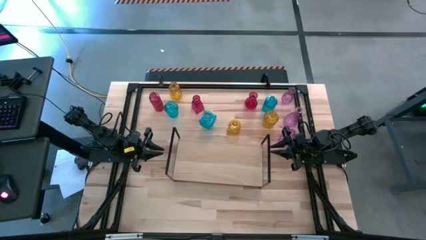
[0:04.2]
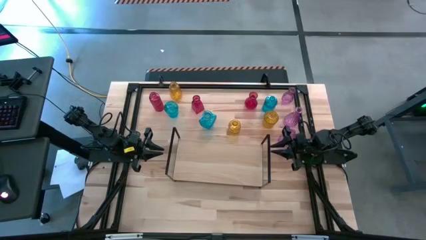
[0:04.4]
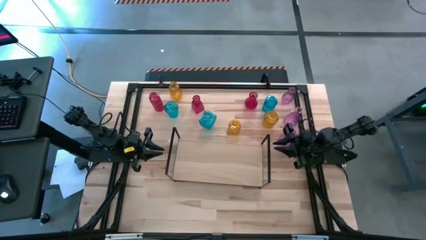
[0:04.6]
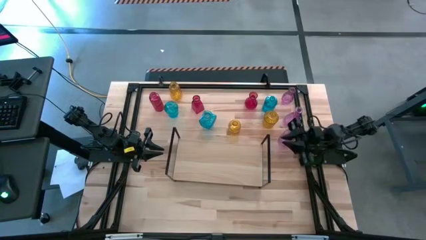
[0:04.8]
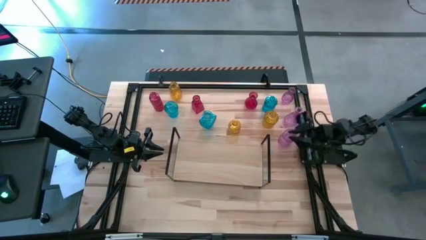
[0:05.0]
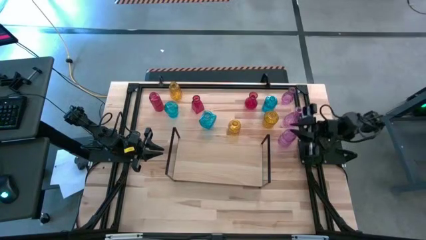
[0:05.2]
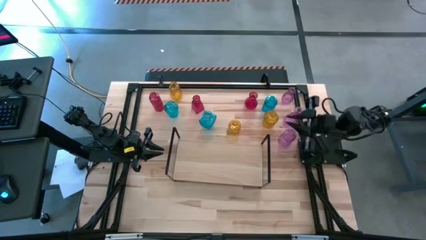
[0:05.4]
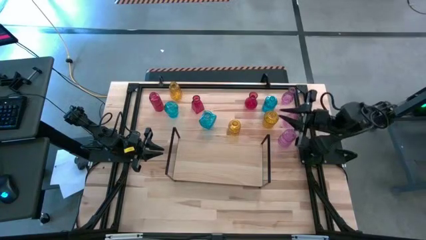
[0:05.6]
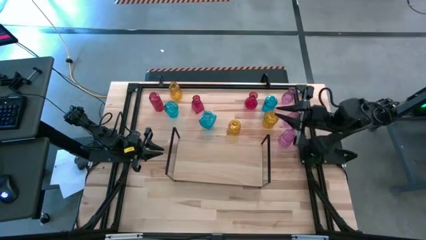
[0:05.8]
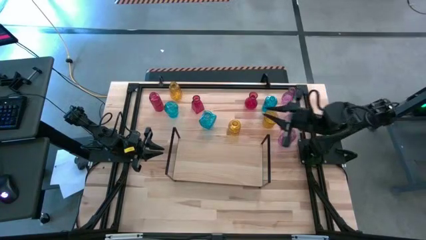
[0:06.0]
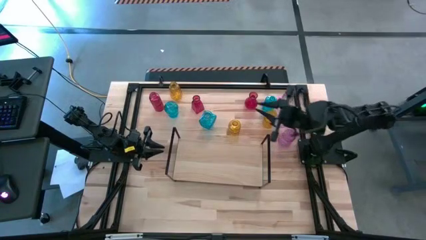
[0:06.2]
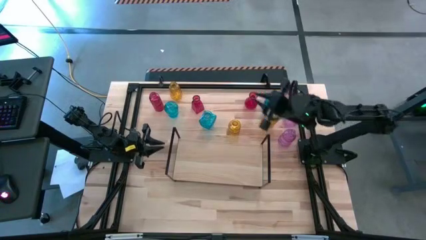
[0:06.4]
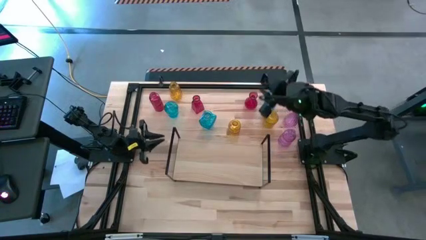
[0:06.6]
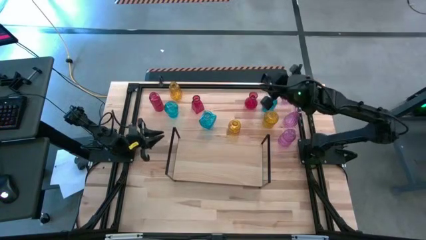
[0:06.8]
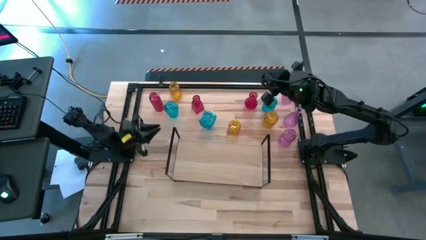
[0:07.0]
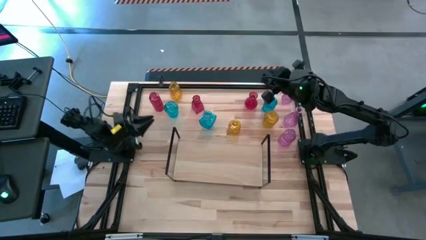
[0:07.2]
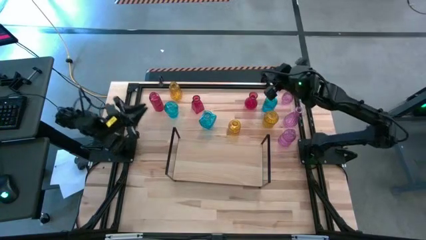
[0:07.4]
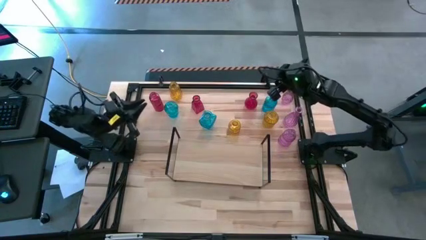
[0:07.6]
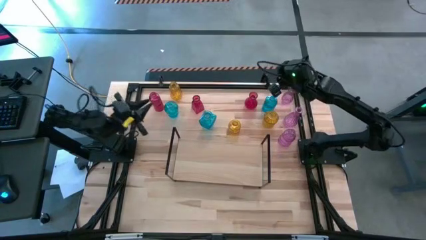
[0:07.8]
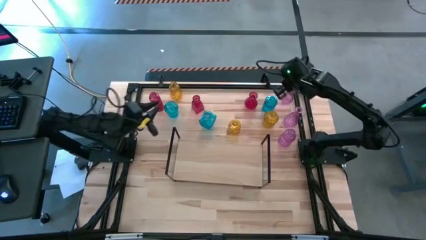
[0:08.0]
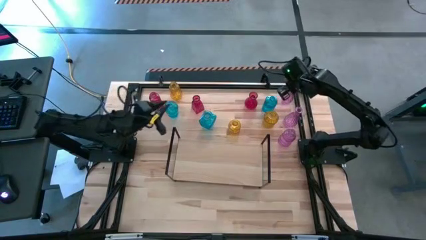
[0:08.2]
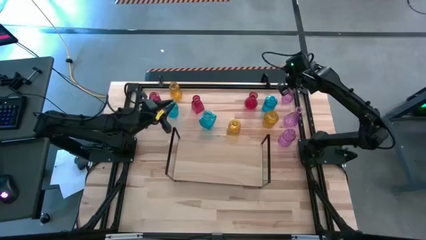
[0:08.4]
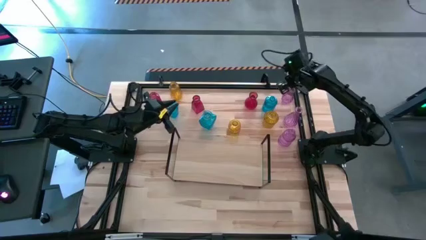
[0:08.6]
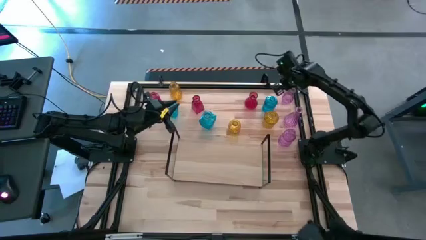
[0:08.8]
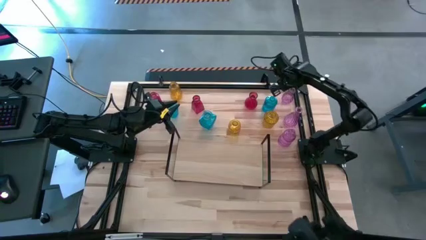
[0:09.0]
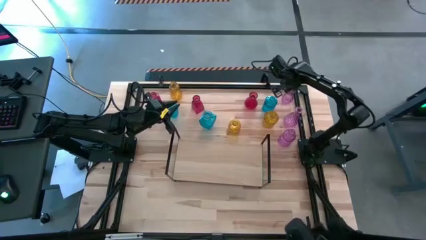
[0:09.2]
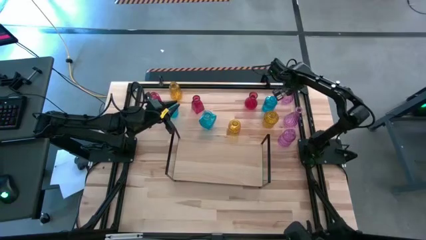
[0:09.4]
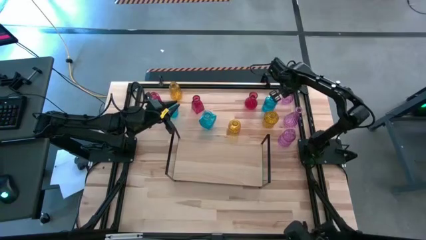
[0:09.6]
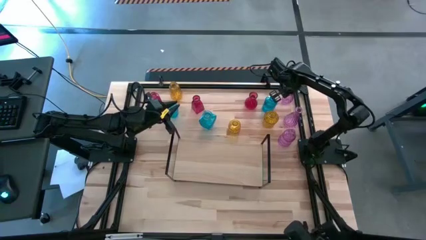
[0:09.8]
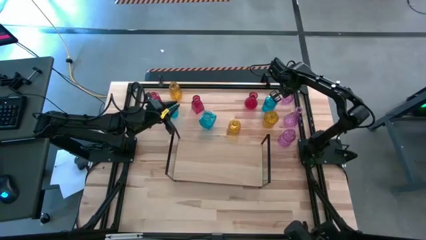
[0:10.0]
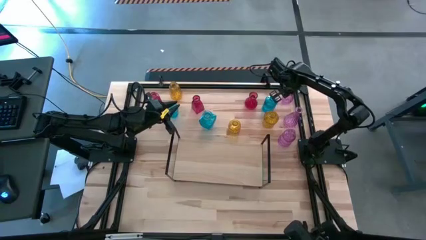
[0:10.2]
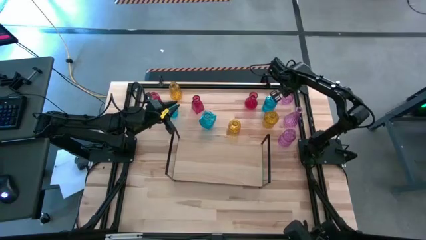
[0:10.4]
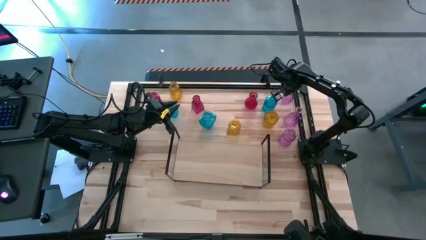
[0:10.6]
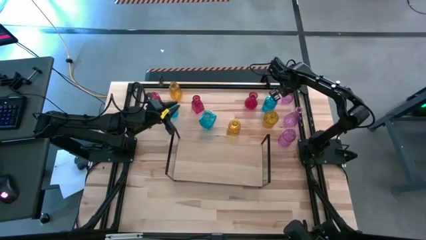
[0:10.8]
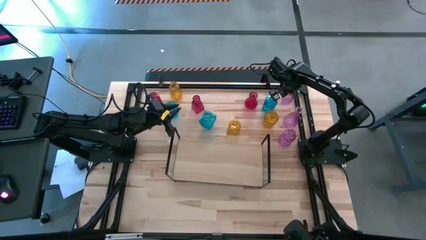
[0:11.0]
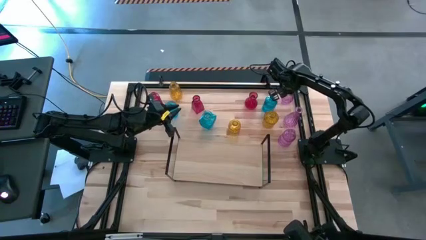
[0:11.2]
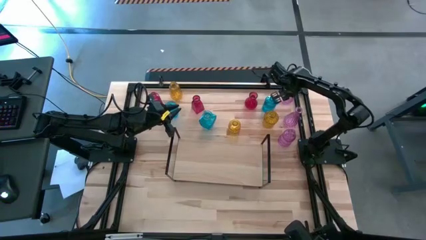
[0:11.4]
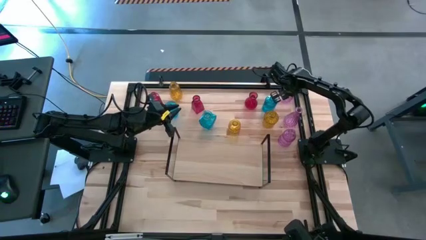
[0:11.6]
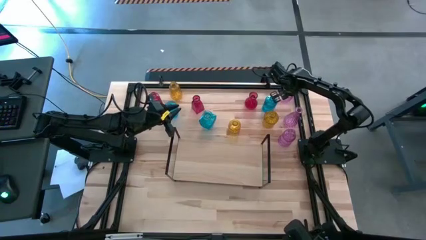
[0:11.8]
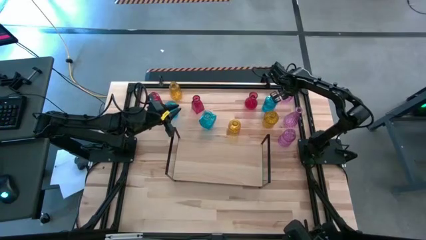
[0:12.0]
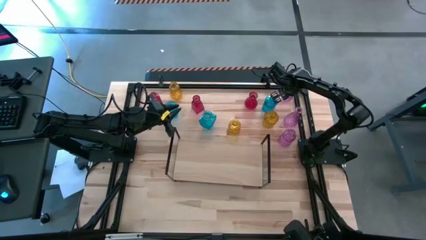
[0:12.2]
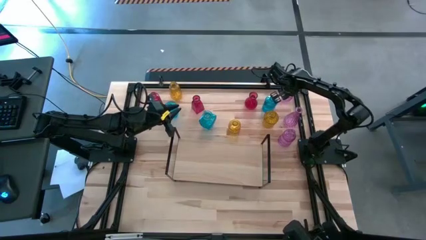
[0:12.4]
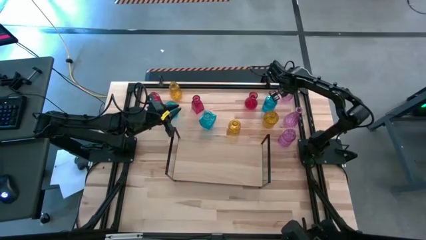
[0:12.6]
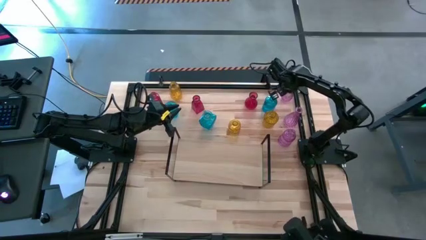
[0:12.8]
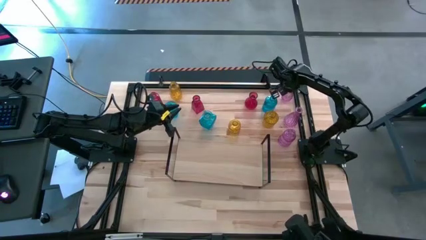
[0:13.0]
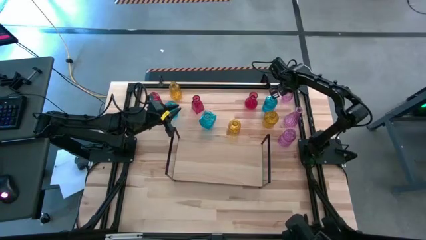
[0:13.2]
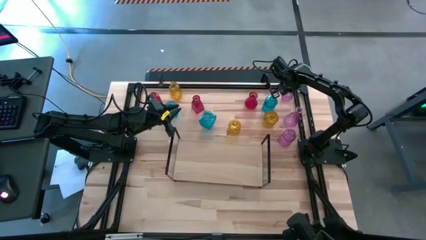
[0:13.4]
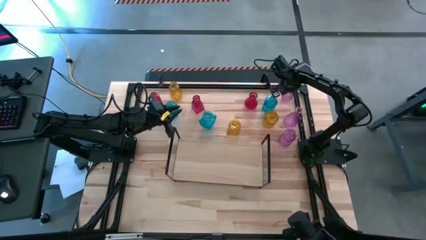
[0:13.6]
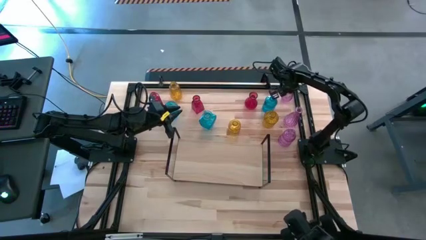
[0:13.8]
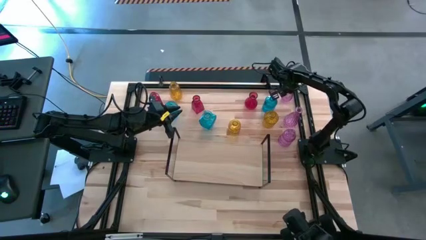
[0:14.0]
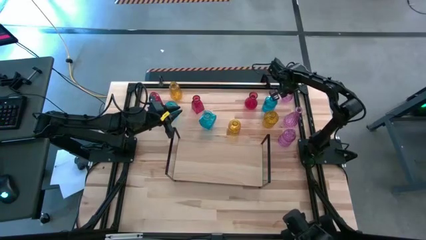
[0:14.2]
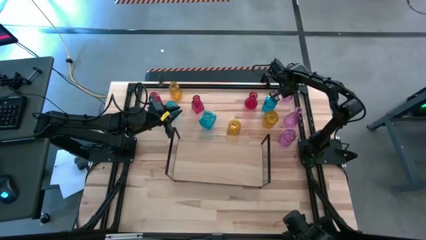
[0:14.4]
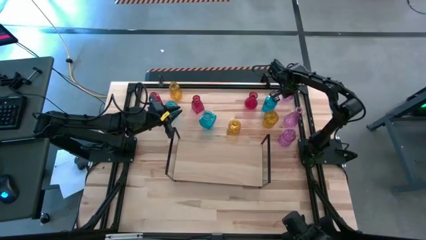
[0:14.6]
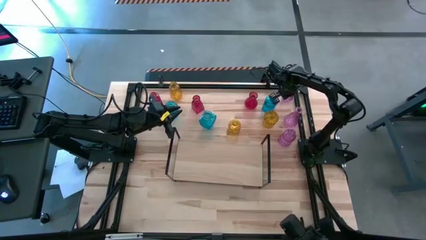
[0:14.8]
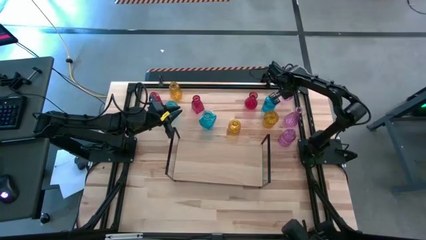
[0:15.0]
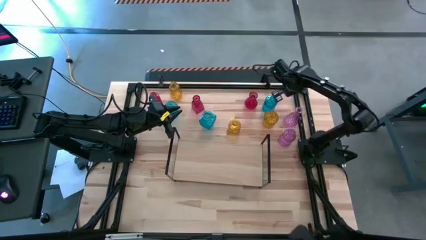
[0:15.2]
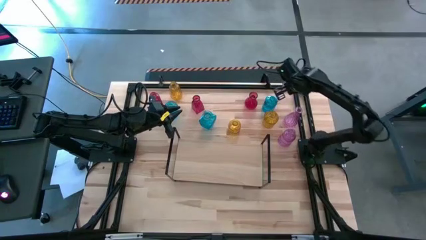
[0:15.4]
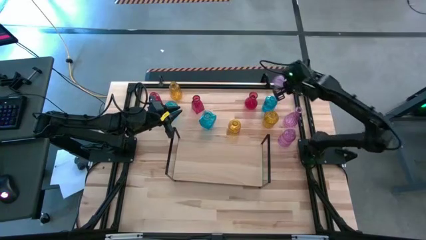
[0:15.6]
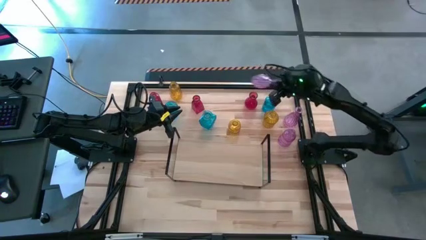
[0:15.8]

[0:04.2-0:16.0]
Task: sort vases onto shelf
Put the top violet vase on the shelf

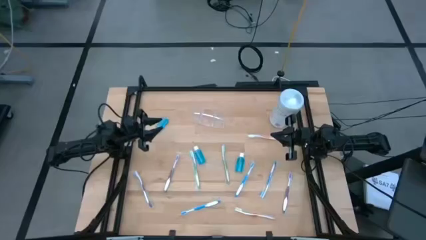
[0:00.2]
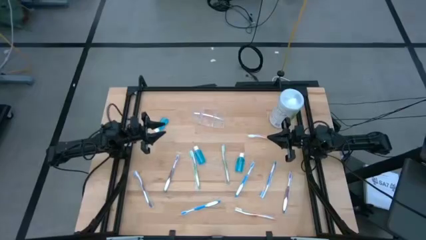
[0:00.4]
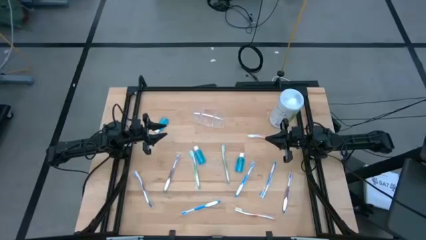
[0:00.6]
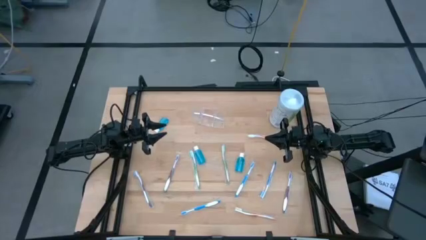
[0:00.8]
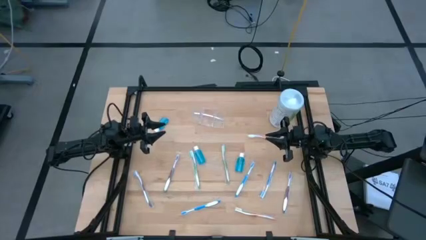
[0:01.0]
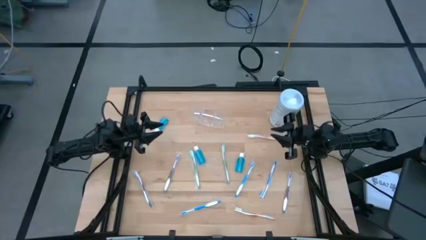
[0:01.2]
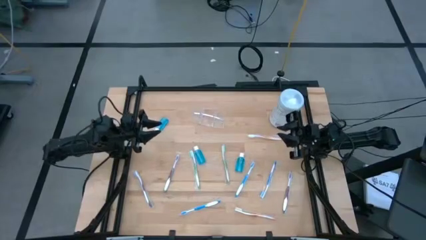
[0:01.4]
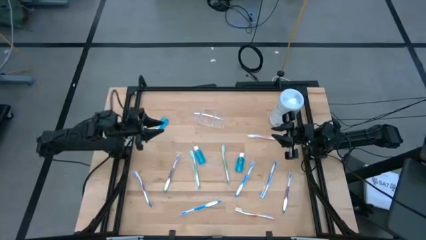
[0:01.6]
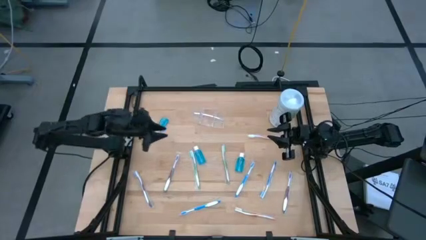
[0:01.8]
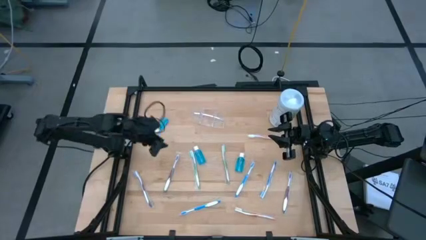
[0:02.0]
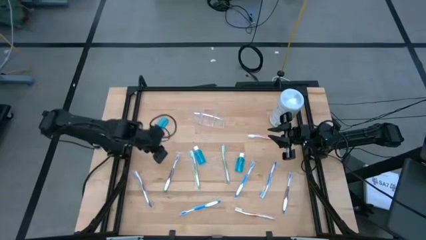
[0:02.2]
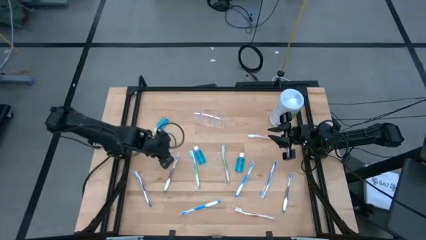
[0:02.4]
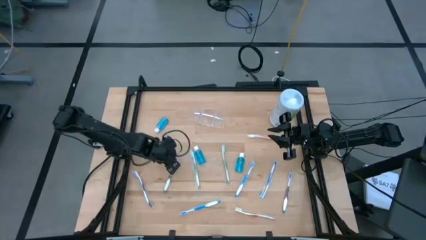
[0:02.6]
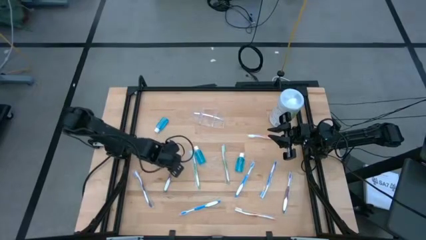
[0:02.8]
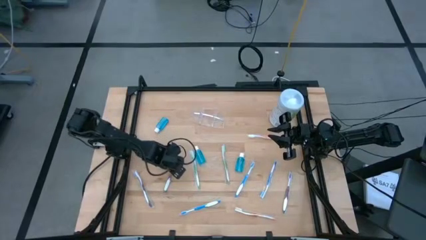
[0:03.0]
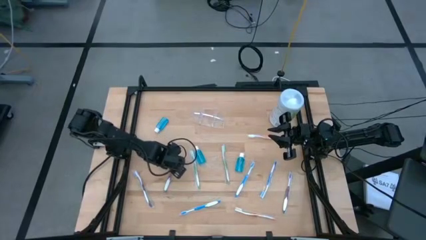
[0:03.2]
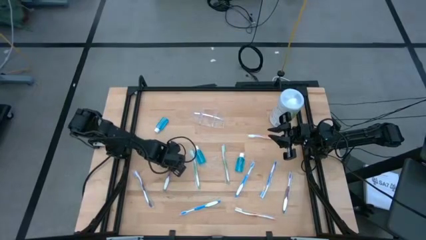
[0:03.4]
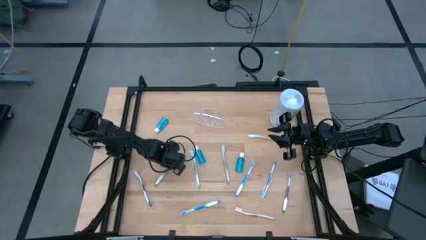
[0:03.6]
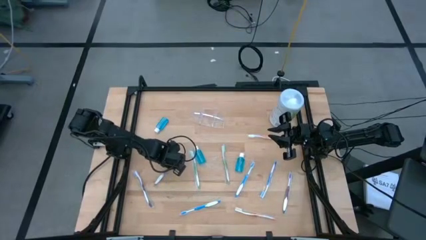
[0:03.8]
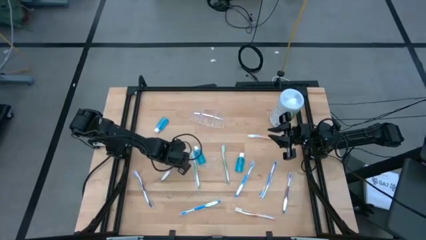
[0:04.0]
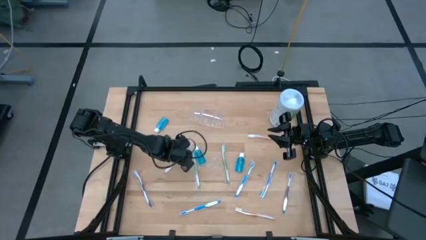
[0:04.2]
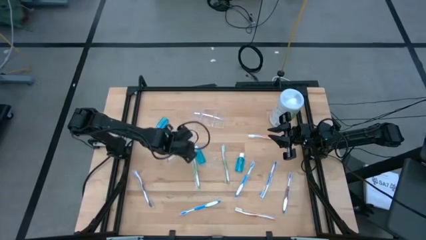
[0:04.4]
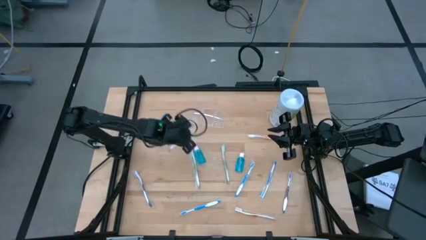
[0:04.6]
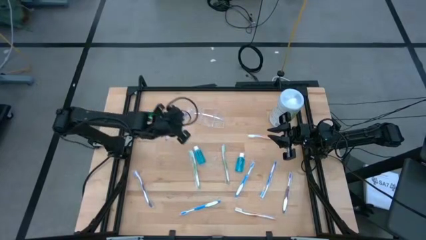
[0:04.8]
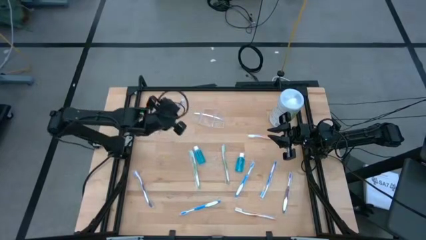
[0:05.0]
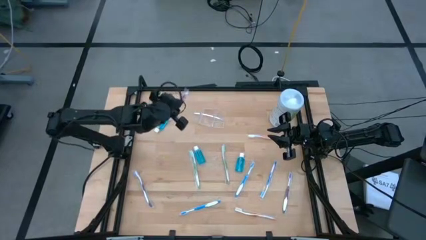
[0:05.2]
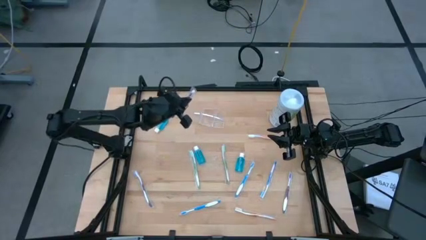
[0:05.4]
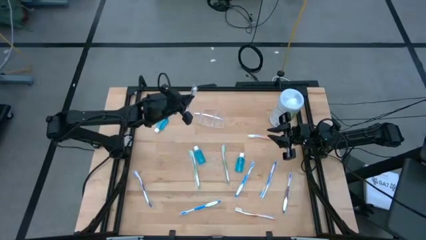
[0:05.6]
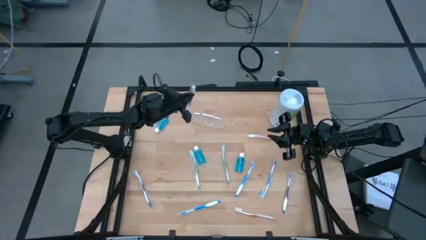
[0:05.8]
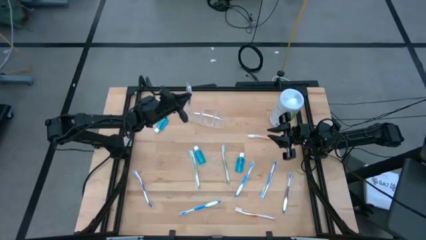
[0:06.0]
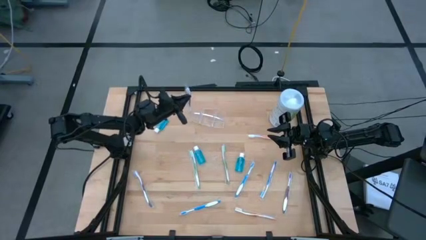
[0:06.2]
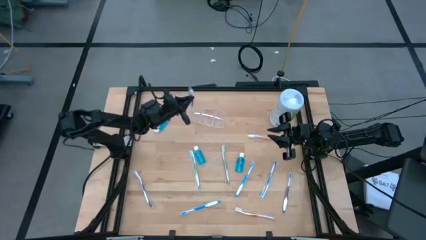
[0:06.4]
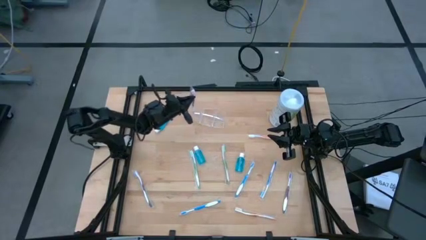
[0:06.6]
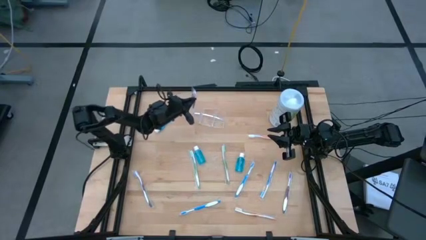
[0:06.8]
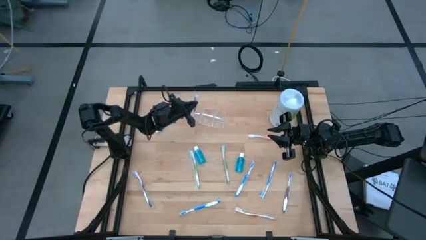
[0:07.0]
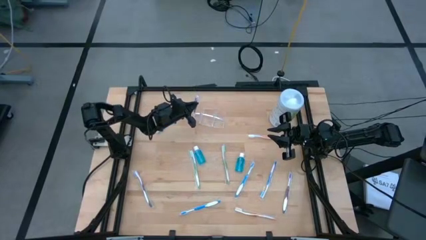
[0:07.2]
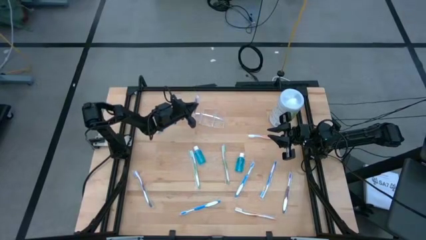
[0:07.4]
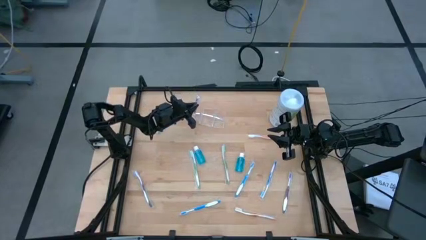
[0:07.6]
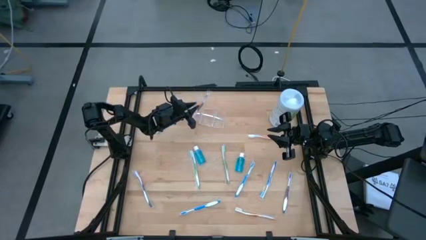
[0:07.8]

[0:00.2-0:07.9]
Task: Pick & Place toothbrushing station
Put the middle purple toothbrush into the left section of the organizer
